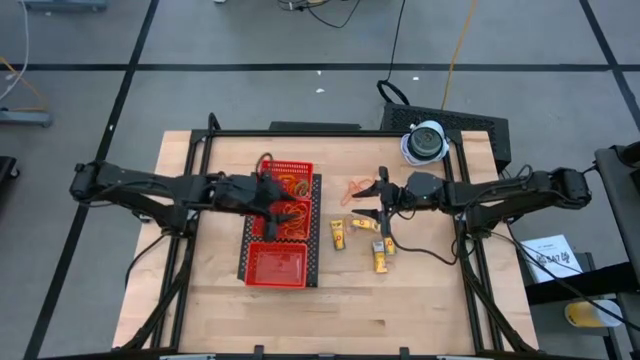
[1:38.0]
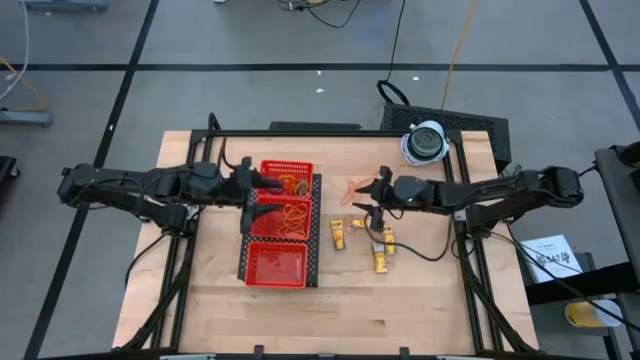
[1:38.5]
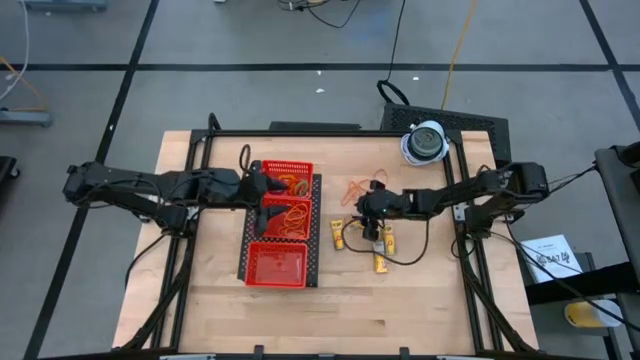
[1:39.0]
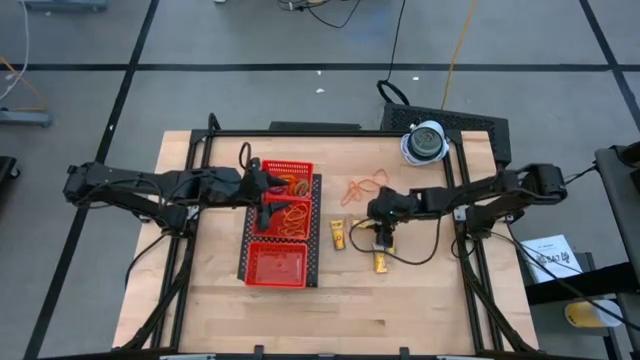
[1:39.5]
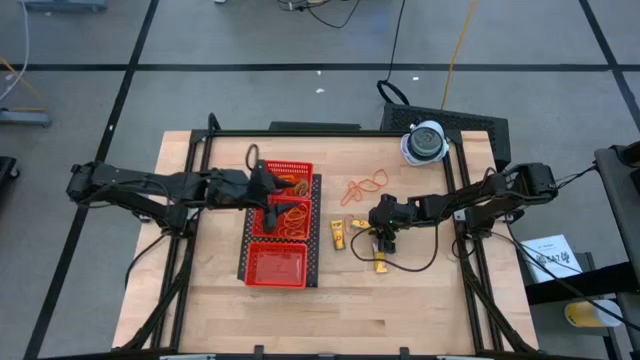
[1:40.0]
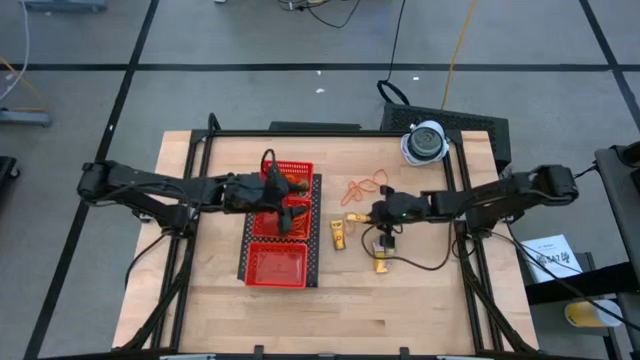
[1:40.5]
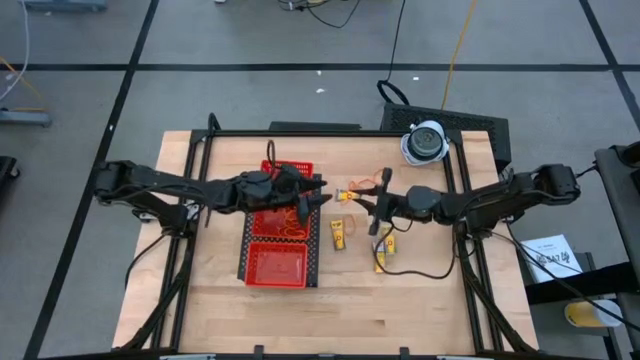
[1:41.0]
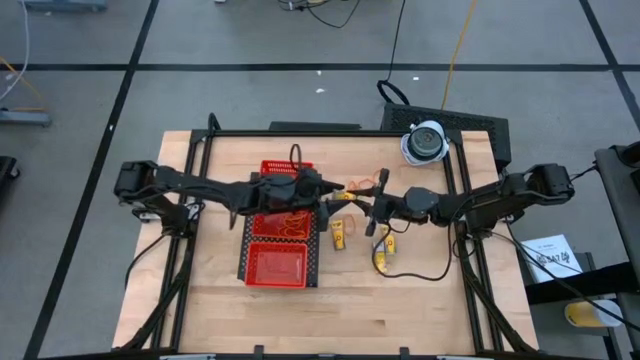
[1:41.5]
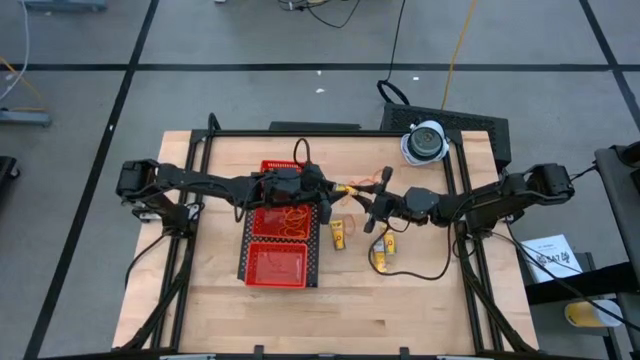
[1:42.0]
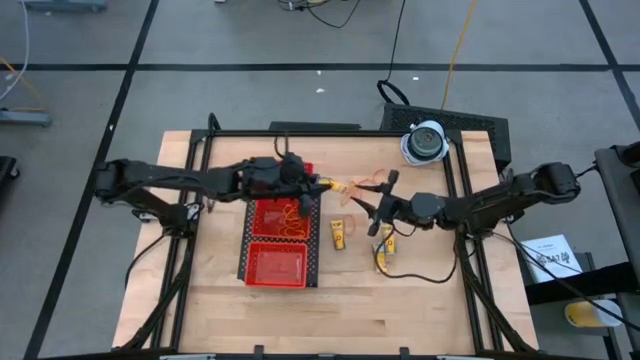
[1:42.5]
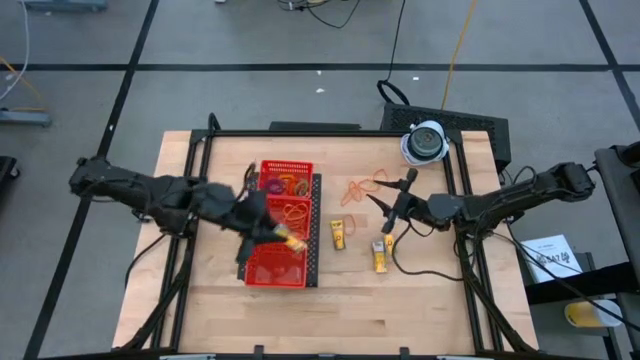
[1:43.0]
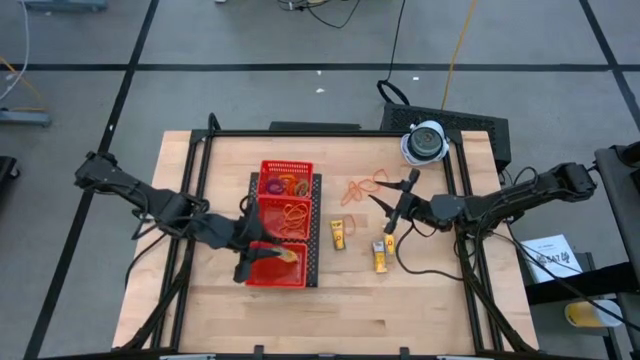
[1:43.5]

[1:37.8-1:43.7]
Task: Pick & Place Office Desk Supplies
Put the yellow pack of crayon into the bottom red basket on the shelf

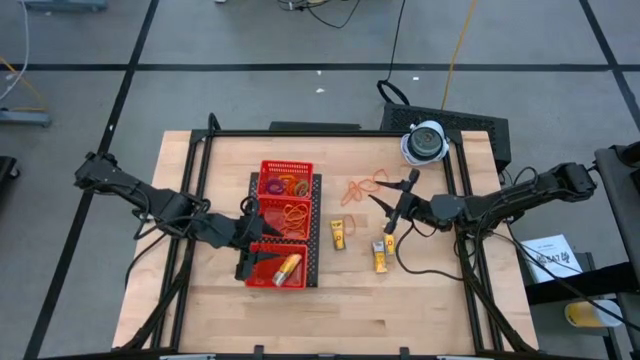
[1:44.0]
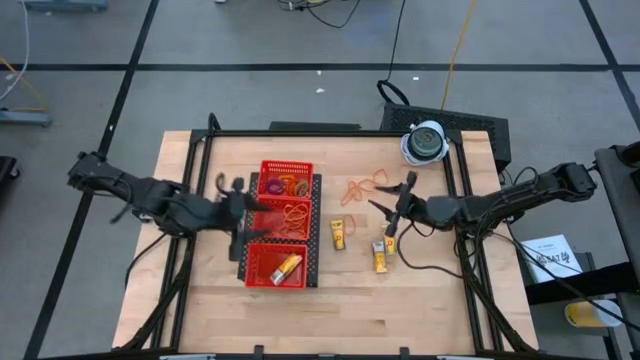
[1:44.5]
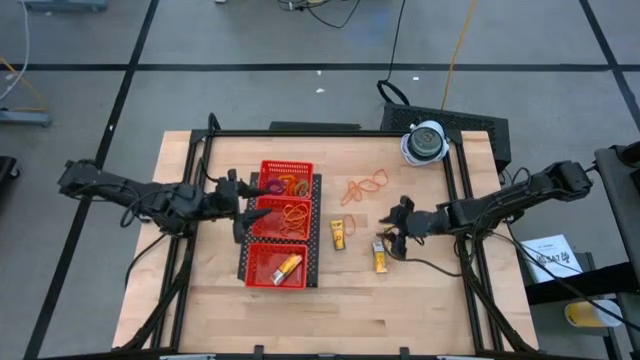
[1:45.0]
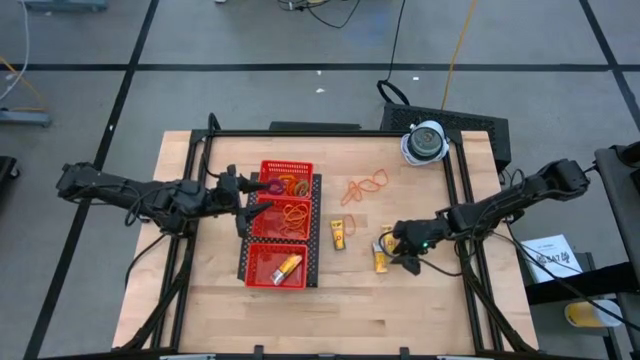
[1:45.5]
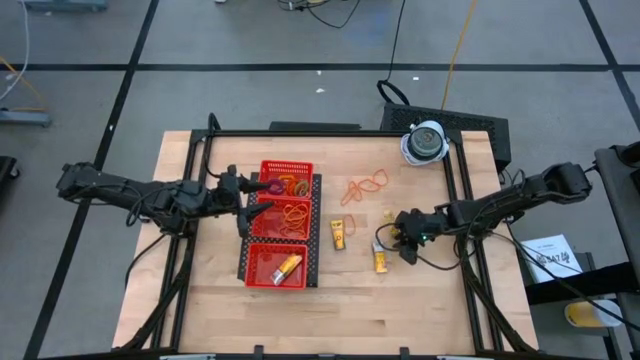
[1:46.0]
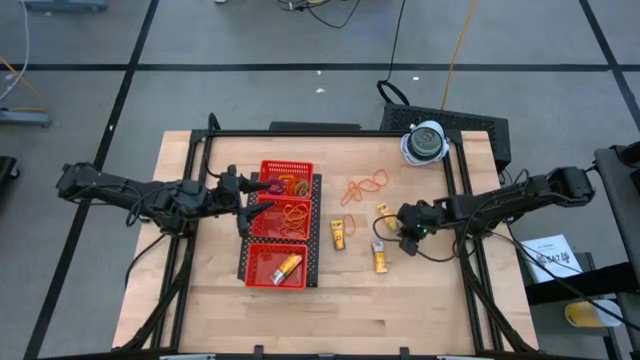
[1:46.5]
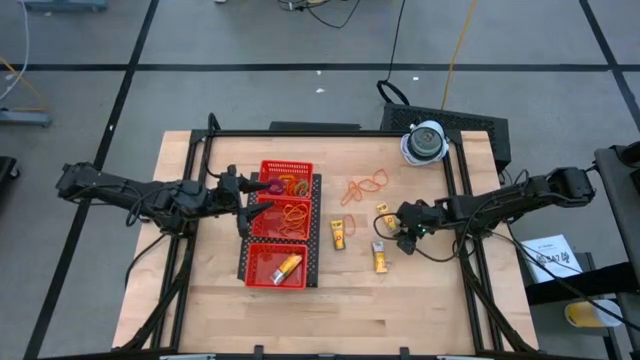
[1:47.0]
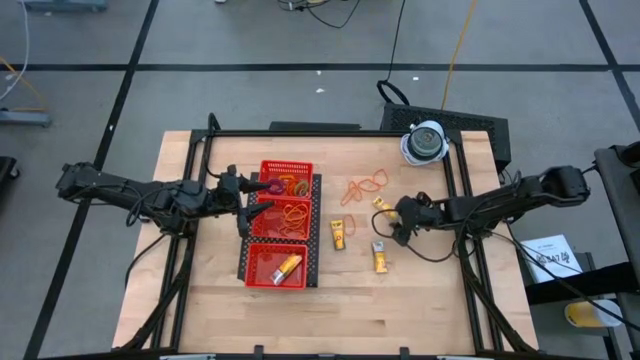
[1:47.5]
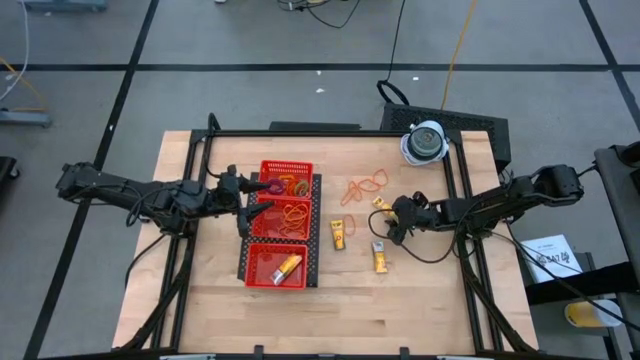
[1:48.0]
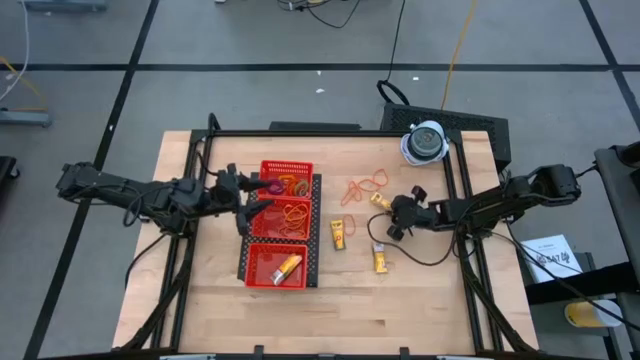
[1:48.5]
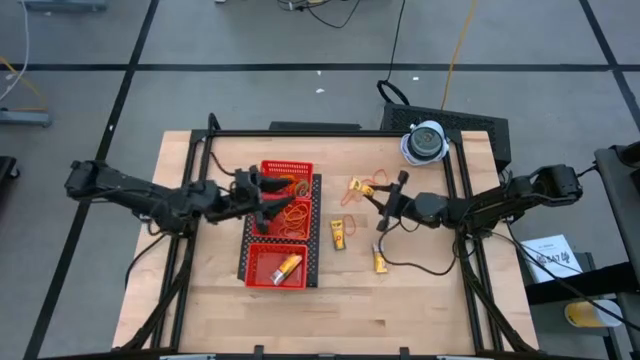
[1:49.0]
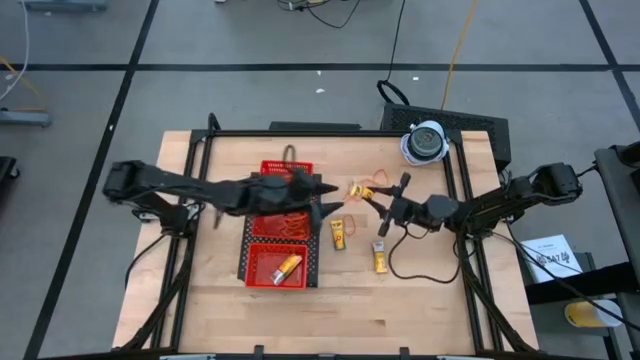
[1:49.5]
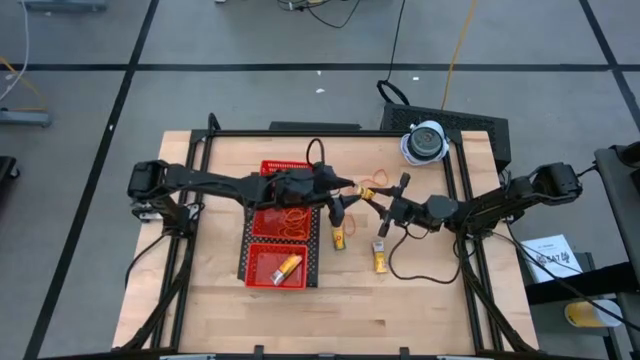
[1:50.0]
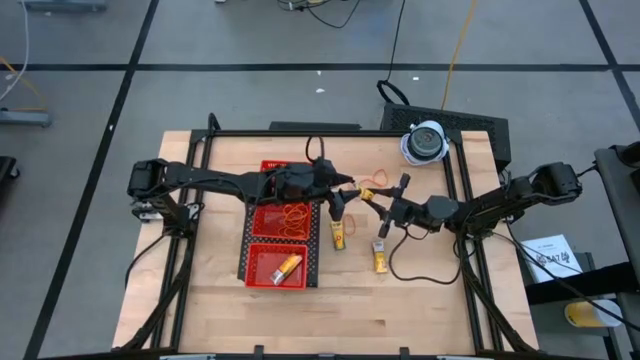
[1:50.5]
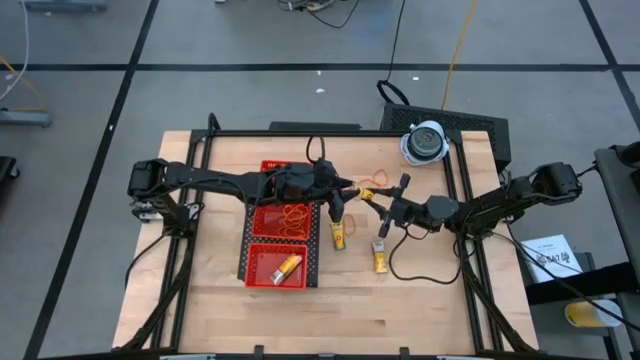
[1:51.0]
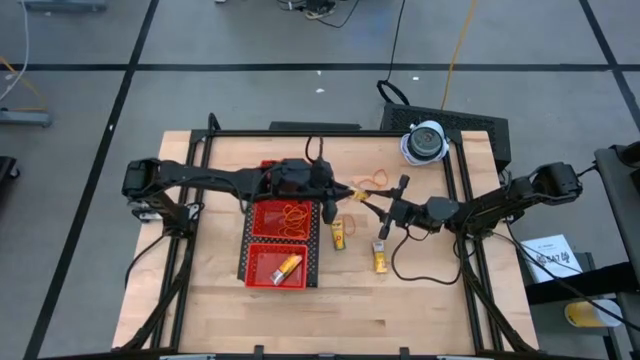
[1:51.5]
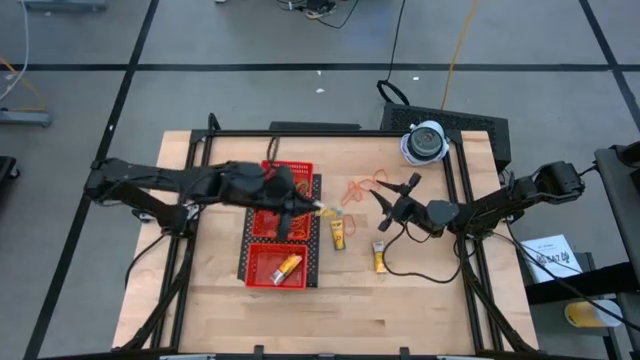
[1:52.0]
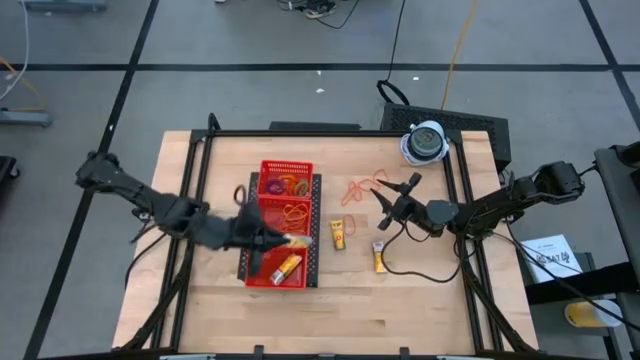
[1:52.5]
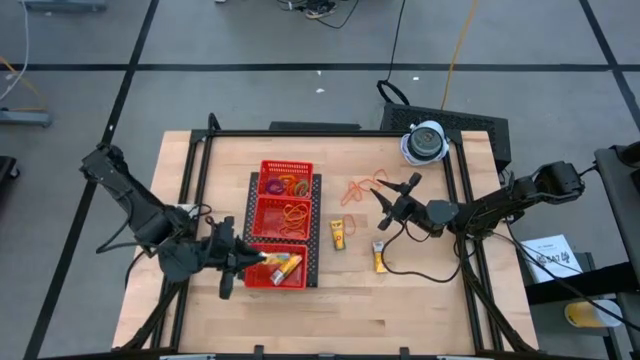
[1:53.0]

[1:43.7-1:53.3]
Put the yellow pack of crayon into the bottom red basket on the shelf

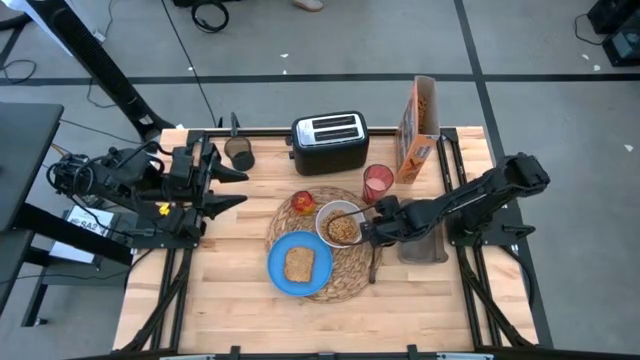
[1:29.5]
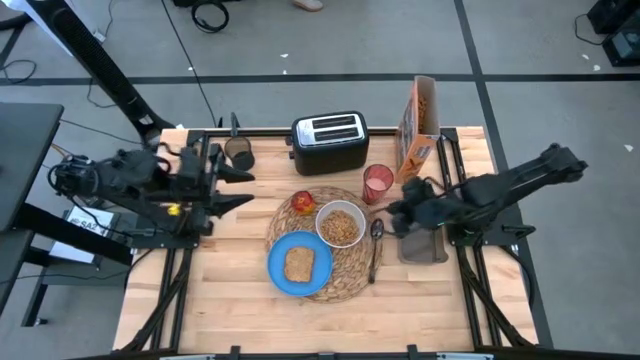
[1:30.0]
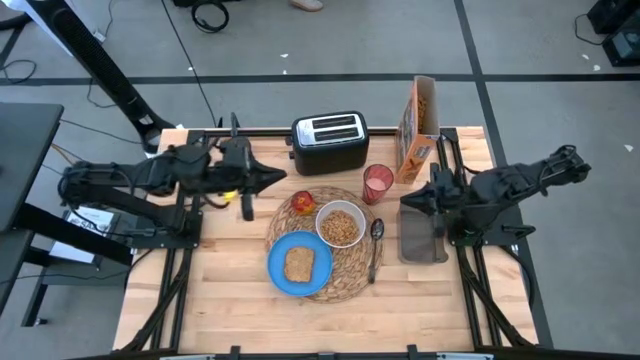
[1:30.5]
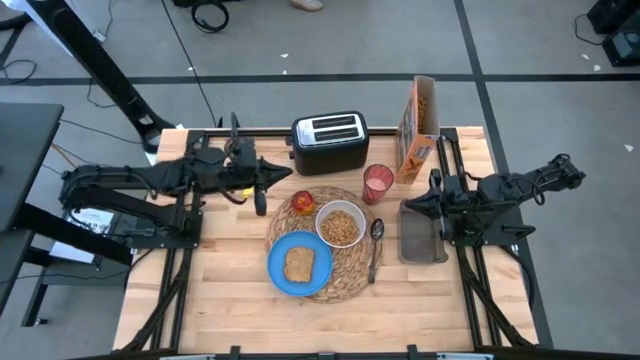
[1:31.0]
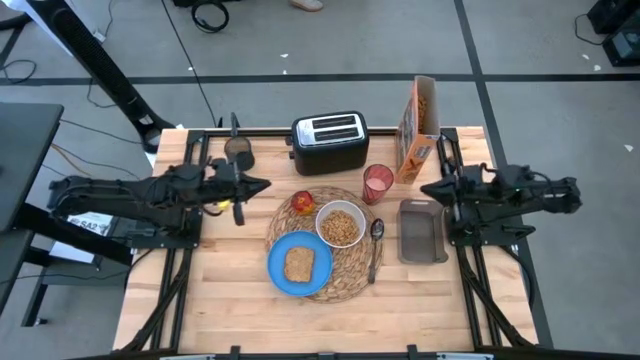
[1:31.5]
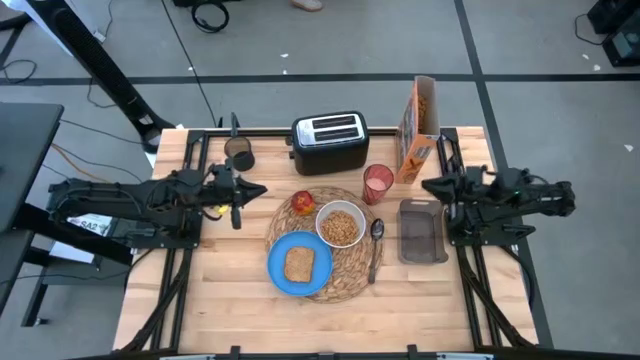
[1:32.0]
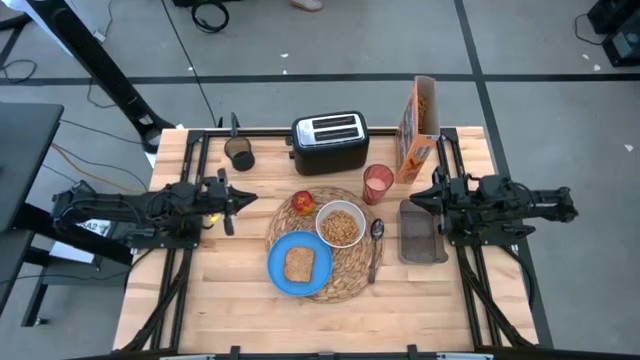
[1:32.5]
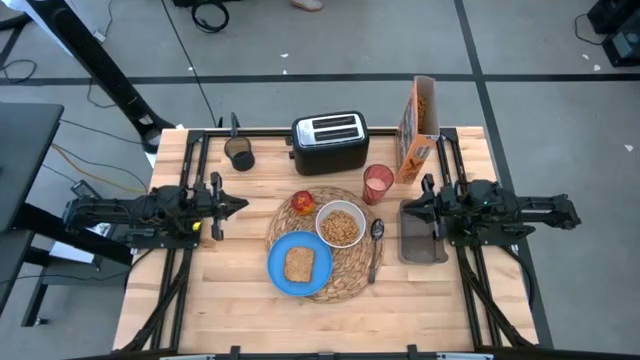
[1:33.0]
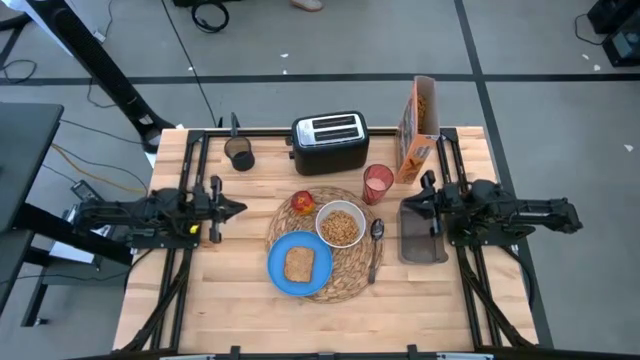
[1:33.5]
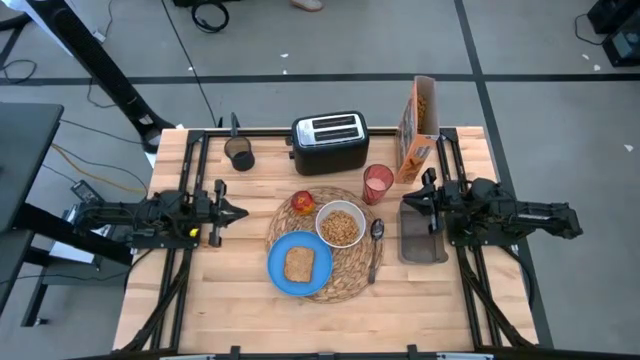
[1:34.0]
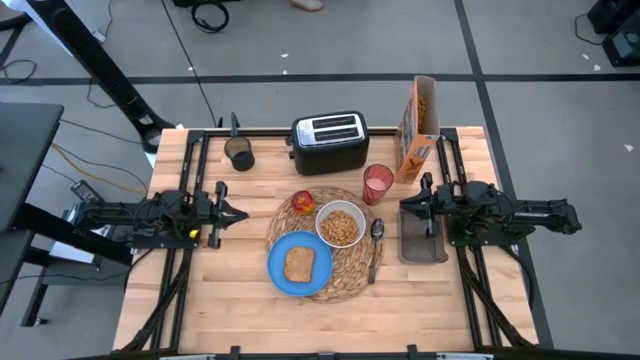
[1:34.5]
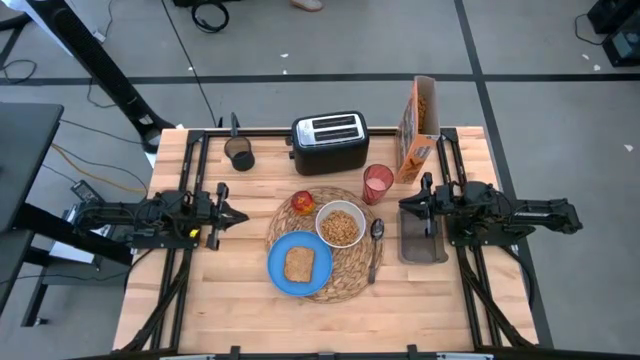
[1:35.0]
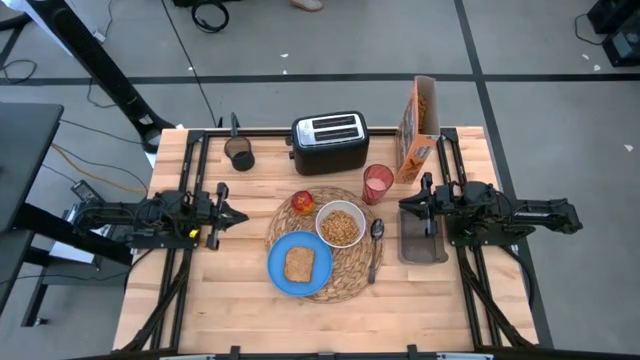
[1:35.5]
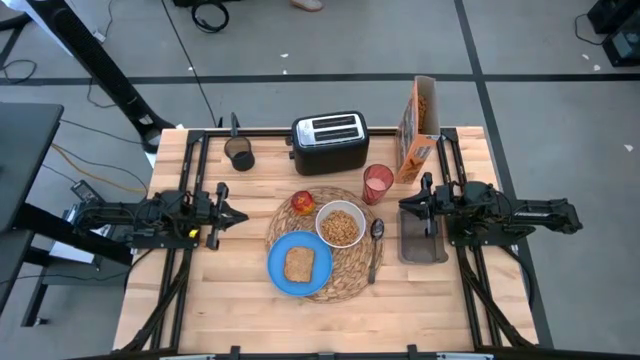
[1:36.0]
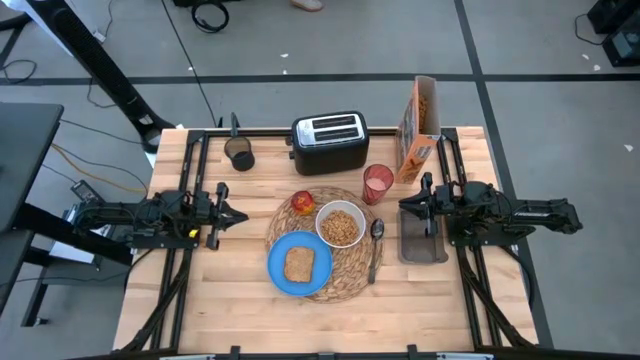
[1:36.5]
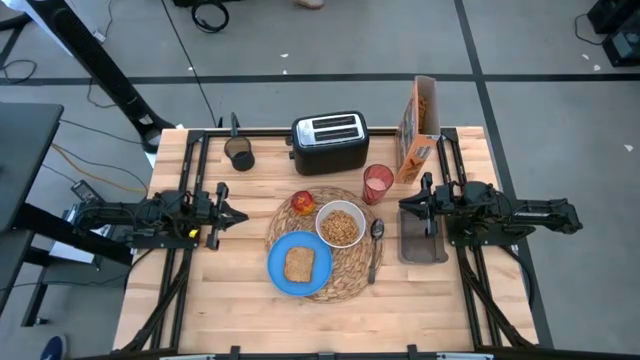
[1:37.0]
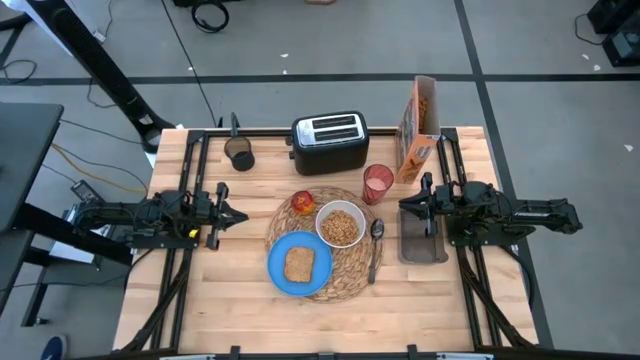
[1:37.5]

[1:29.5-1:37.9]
Task: Arrange a breakfast setting
Return to Home Position
